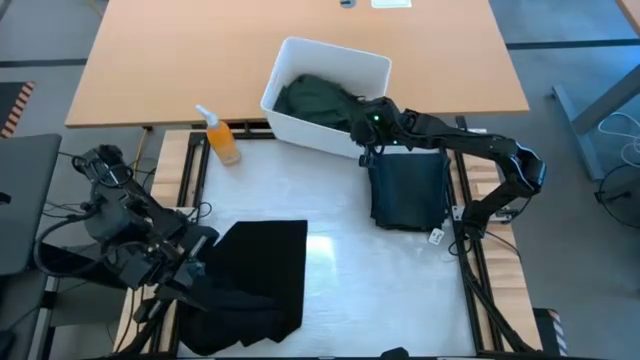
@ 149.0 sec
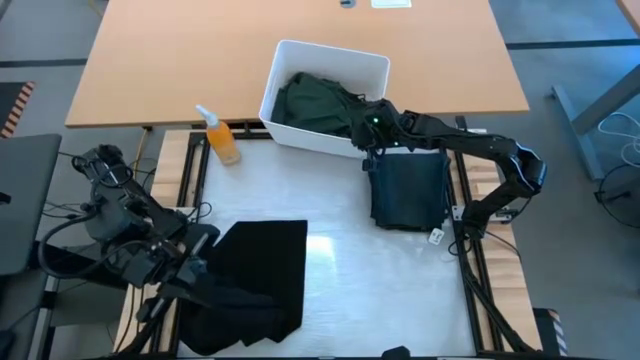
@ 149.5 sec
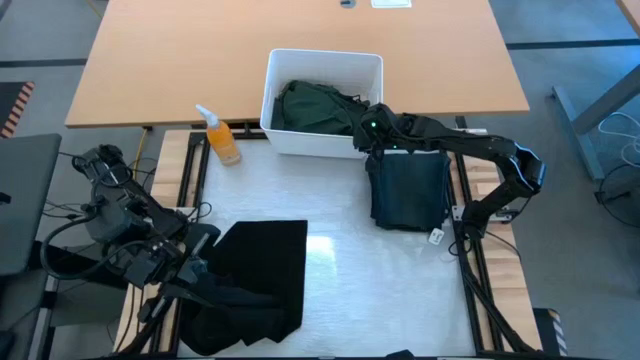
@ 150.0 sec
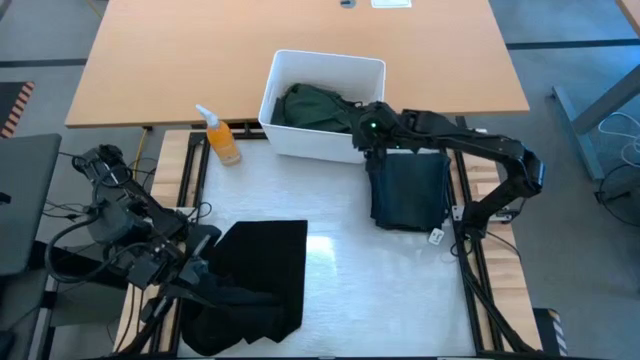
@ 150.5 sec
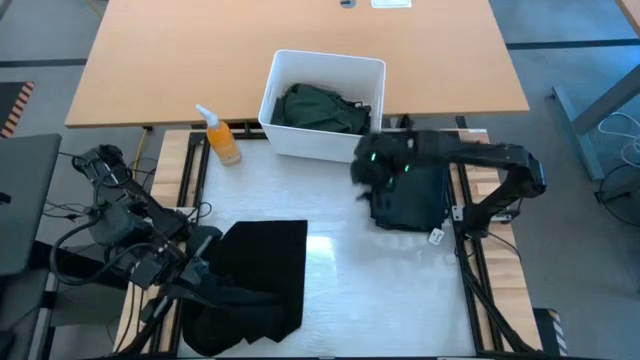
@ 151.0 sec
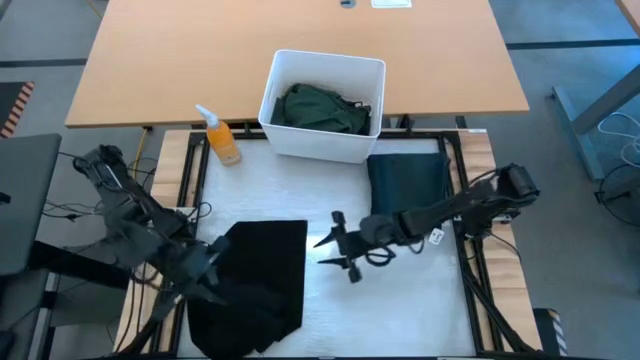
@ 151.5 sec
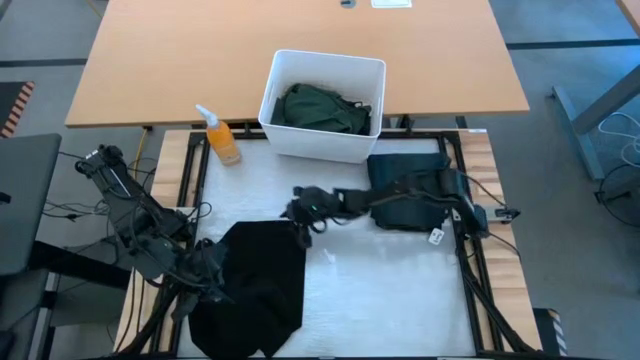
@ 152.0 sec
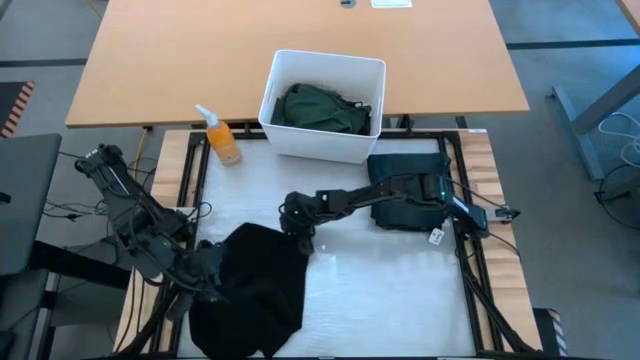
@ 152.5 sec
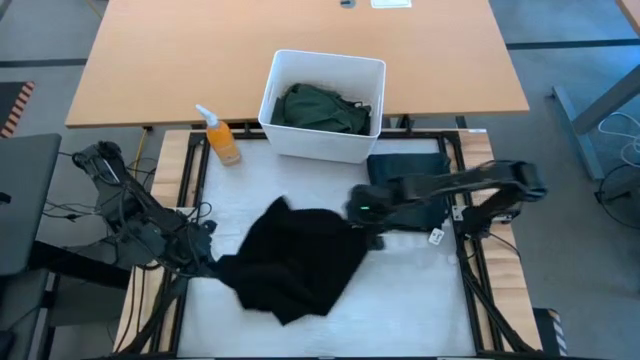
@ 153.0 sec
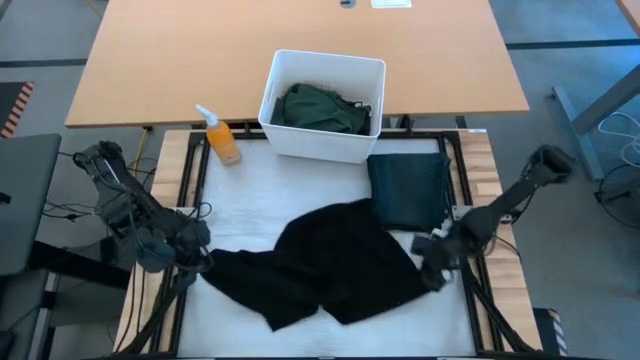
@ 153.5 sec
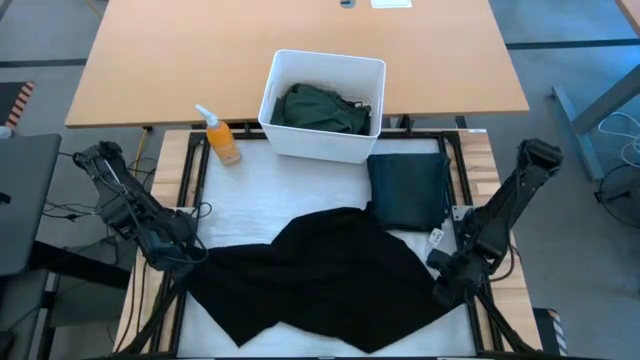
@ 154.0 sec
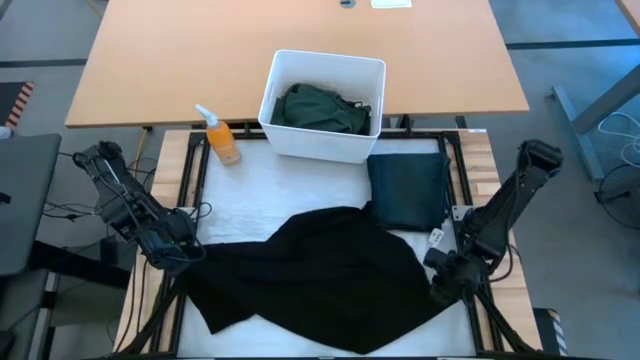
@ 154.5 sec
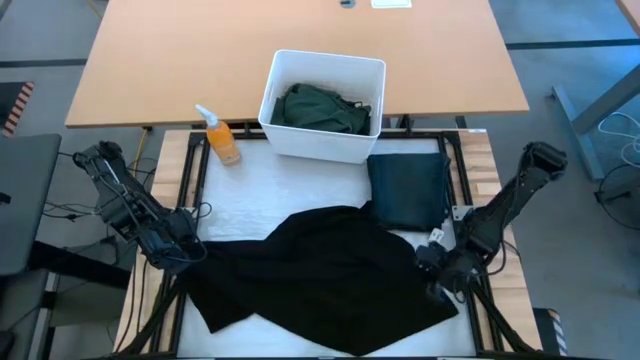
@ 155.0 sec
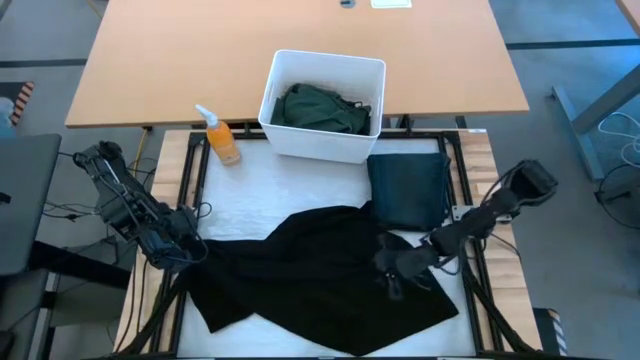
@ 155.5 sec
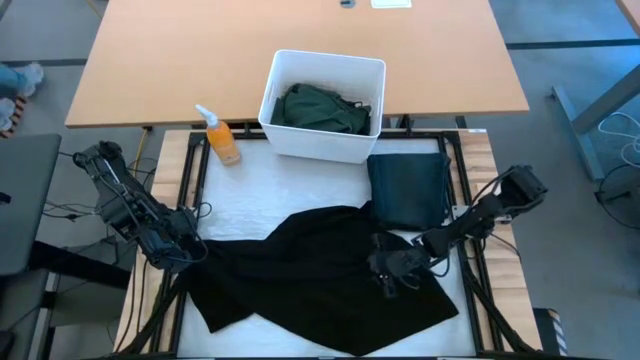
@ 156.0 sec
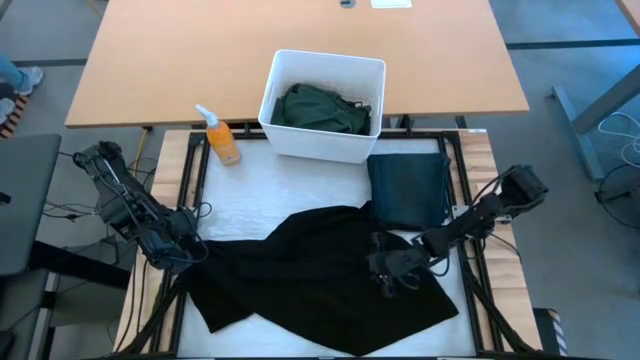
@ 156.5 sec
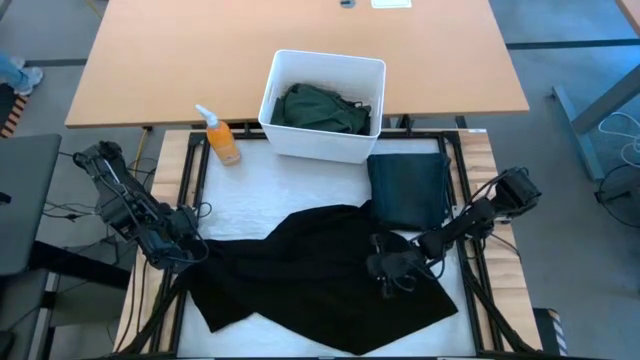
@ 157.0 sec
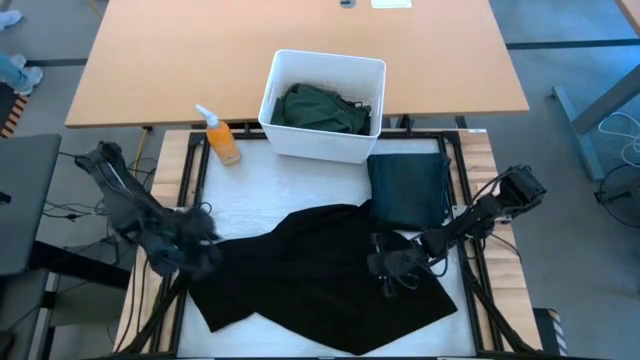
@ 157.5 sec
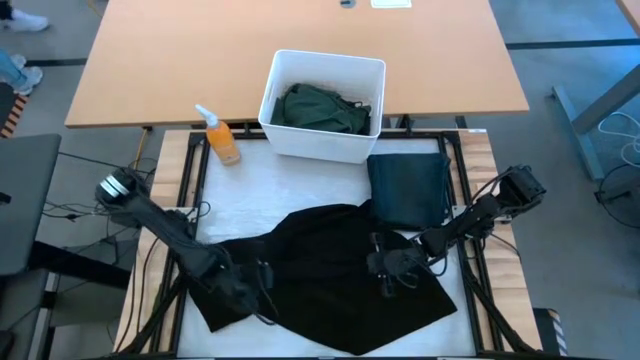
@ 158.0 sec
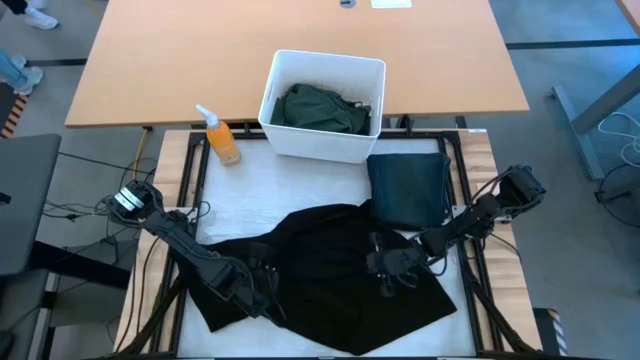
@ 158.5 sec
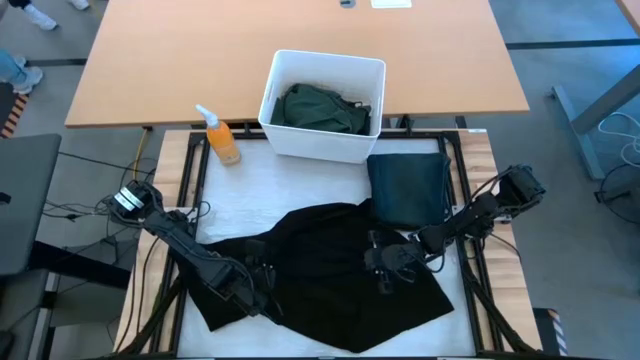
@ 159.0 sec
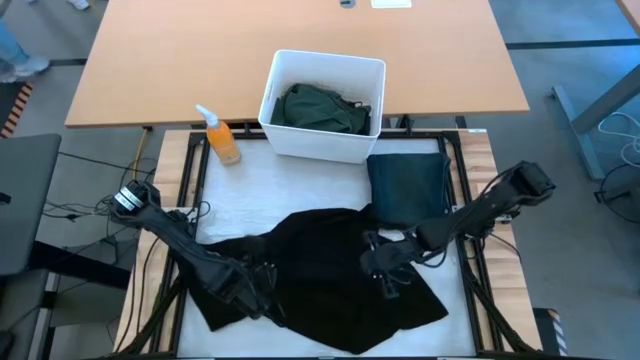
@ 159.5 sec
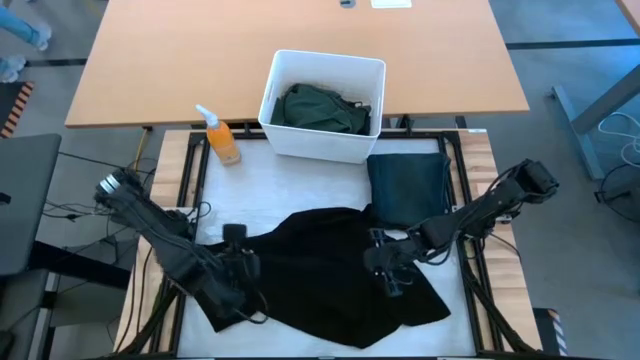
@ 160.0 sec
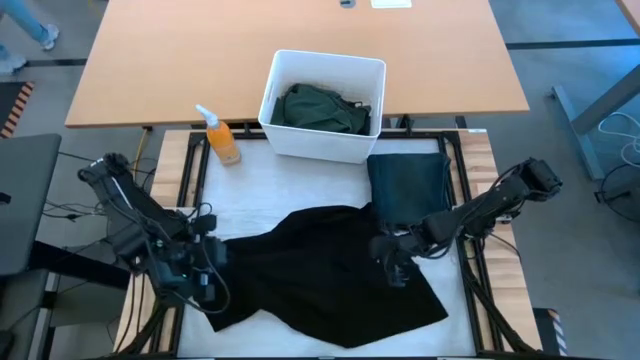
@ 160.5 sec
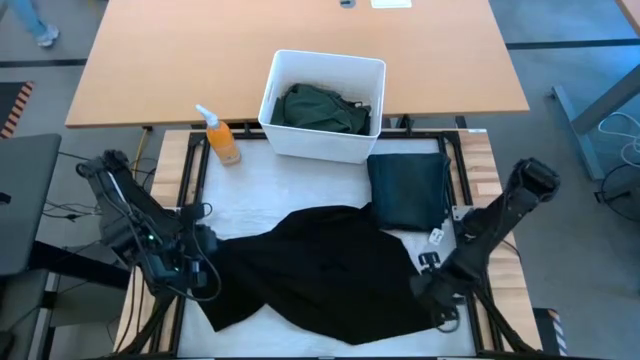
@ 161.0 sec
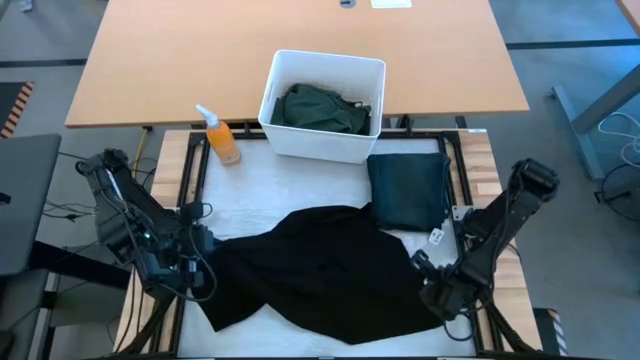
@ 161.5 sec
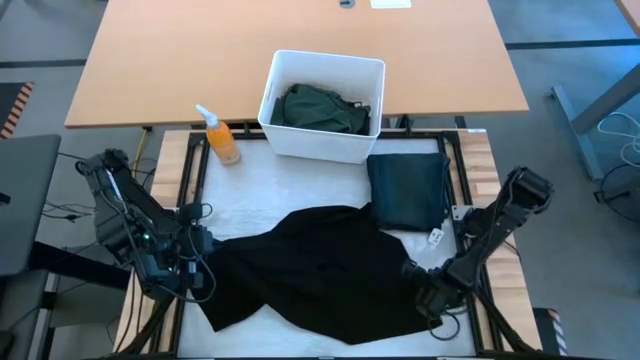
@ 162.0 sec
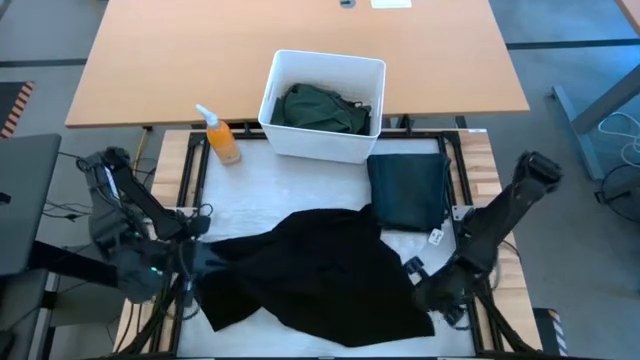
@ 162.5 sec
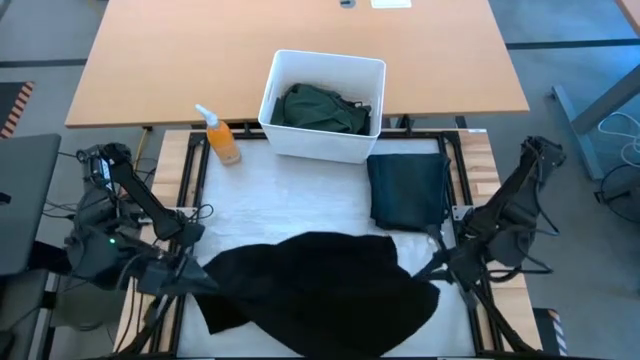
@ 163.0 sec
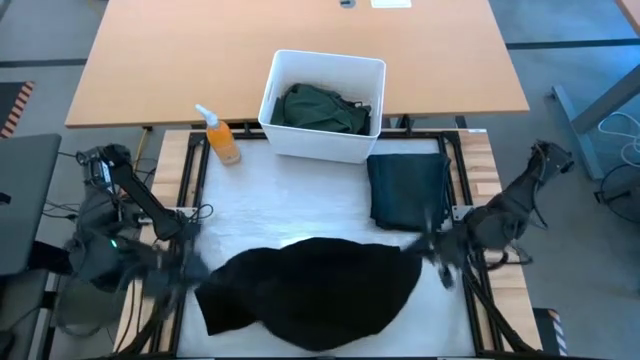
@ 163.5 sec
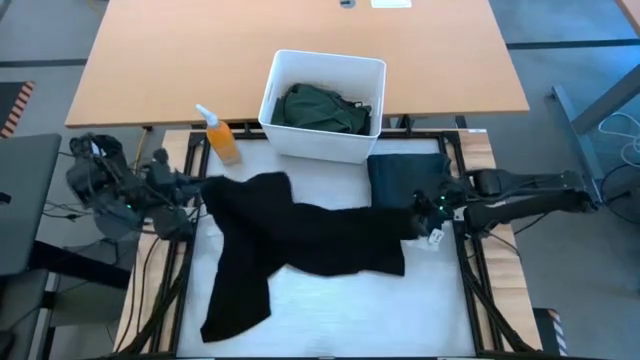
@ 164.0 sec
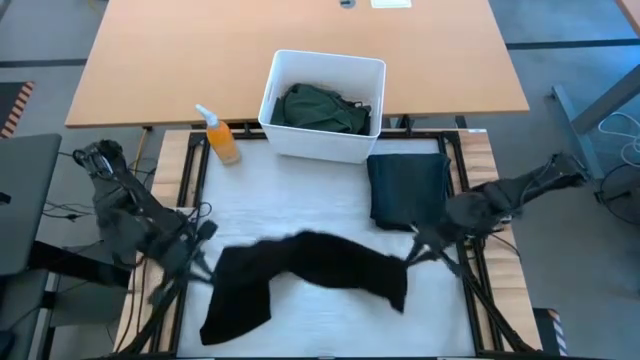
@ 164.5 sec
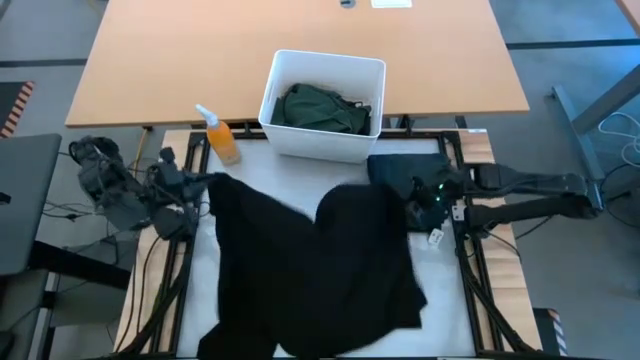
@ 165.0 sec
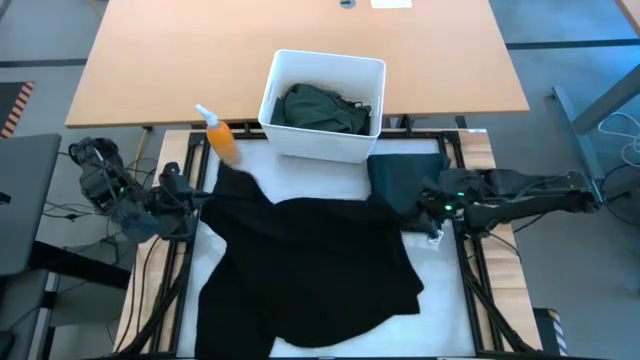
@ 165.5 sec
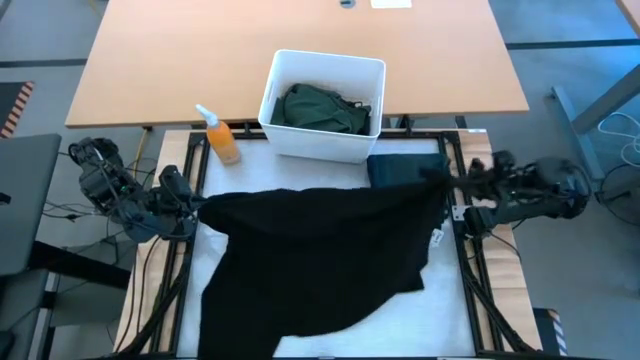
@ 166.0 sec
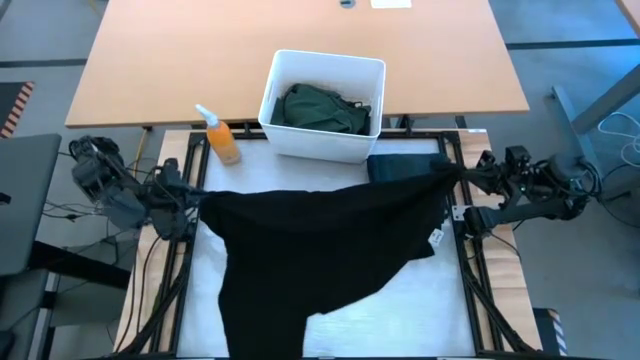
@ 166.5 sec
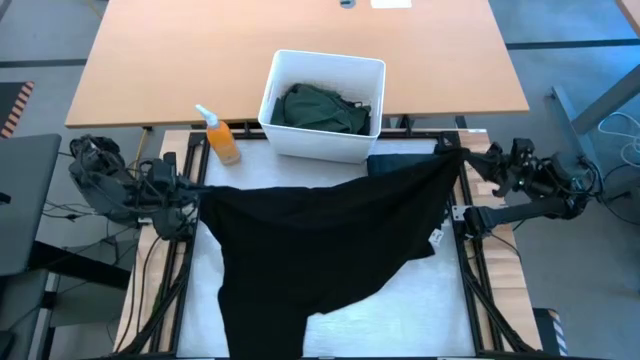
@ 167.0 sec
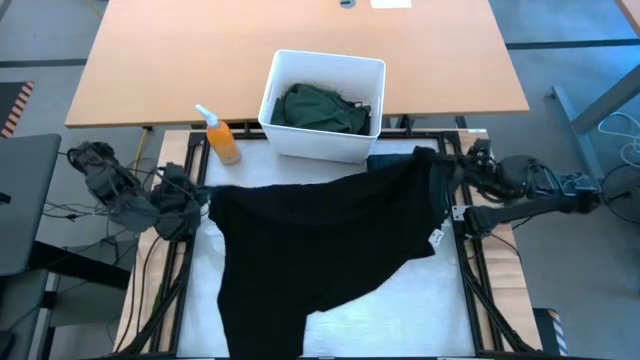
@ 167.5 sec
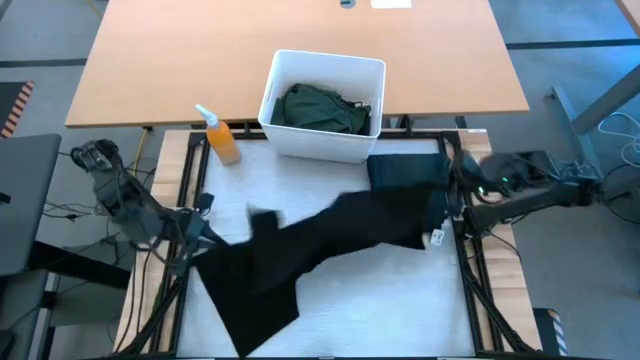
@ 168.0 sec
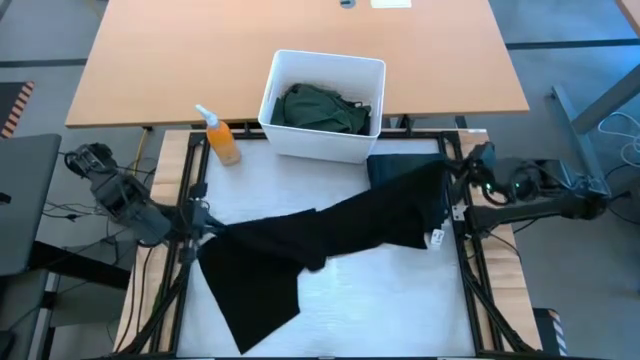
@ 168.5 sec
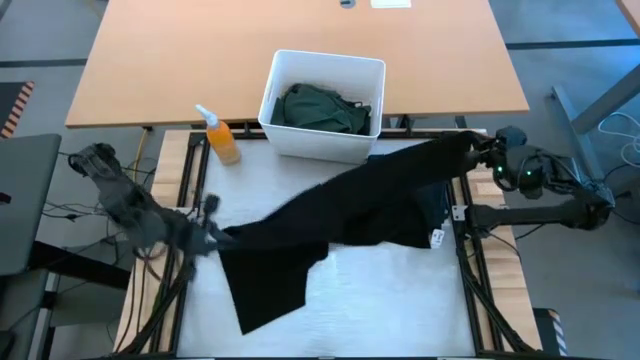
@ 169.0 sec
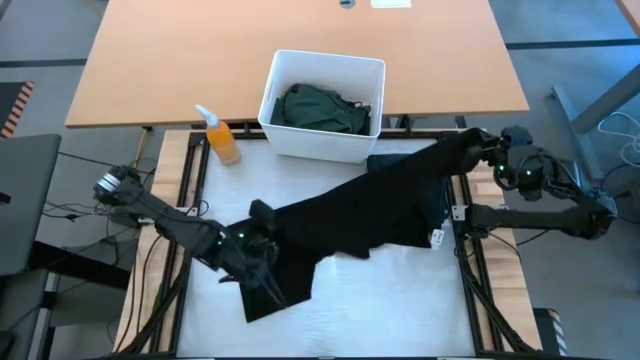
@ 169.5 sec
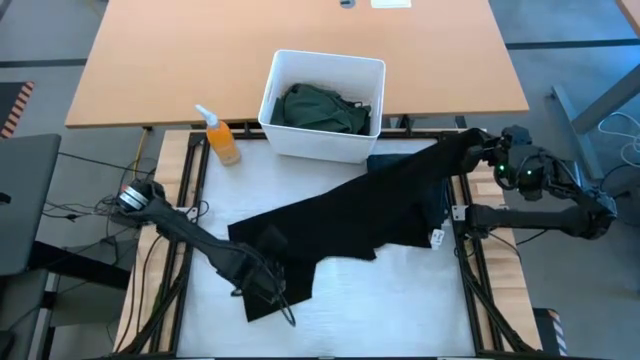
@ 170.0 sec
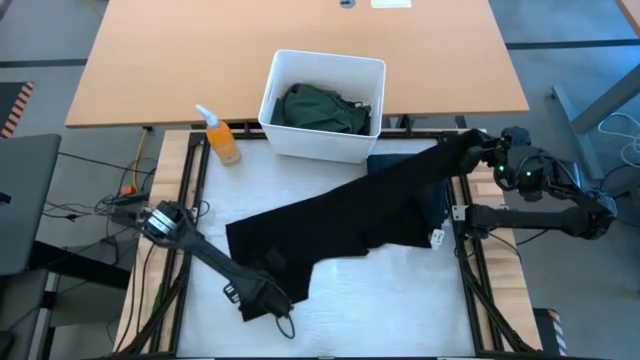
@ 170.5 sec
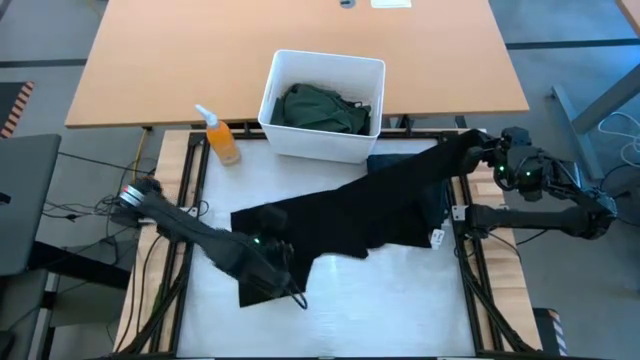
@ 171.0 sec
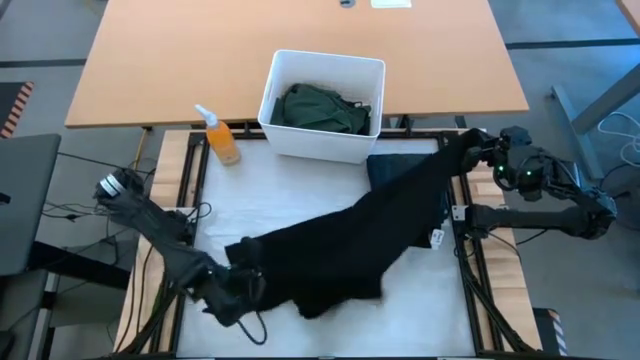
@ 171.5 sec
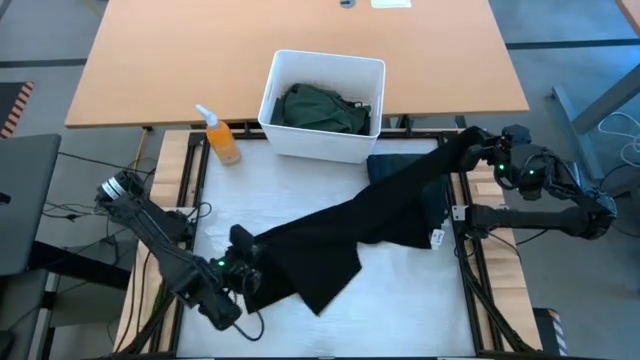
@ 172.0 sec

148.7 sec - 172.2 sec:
Task: Fold laundry
Fold the black t-shirt
